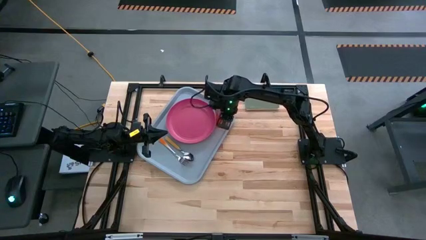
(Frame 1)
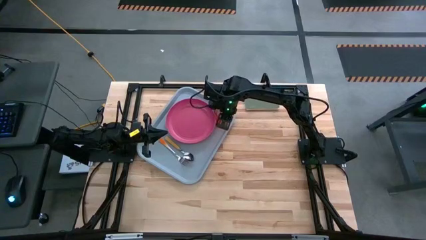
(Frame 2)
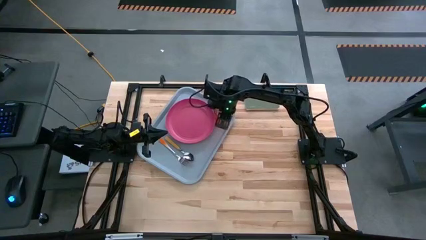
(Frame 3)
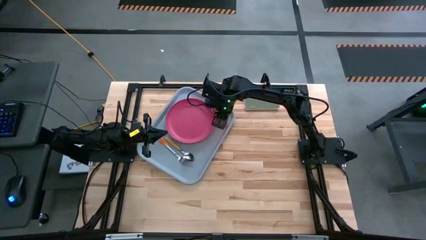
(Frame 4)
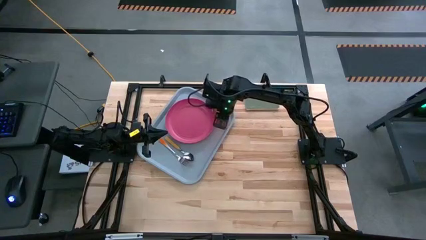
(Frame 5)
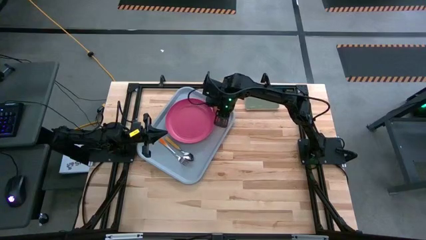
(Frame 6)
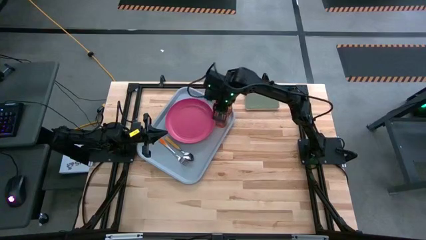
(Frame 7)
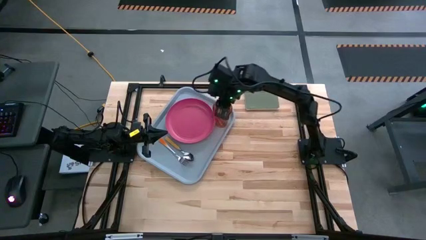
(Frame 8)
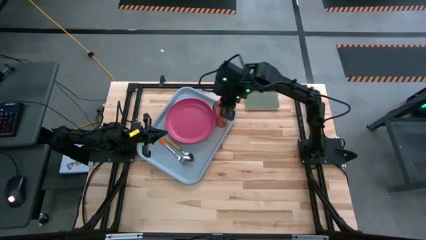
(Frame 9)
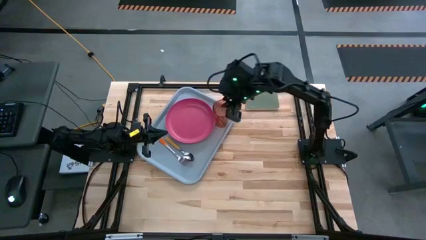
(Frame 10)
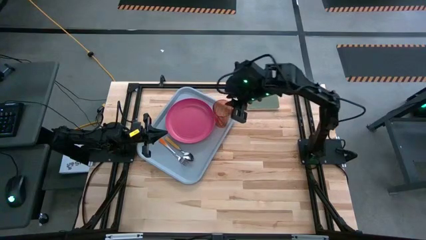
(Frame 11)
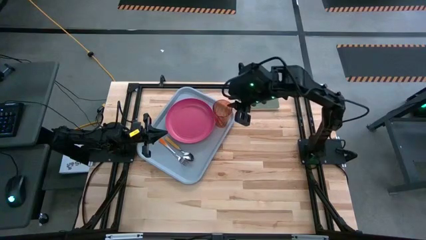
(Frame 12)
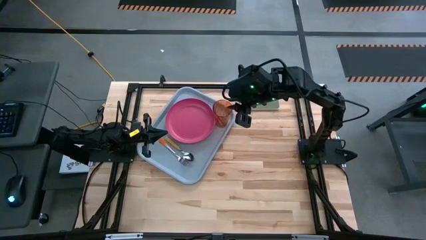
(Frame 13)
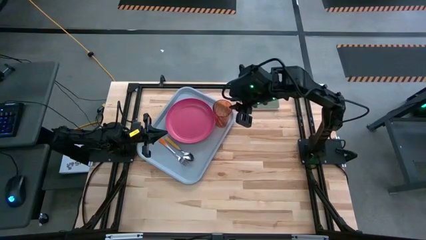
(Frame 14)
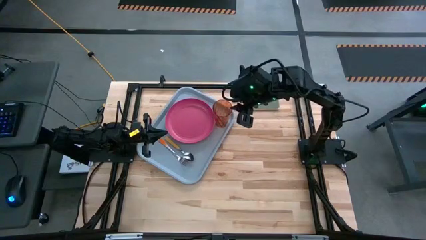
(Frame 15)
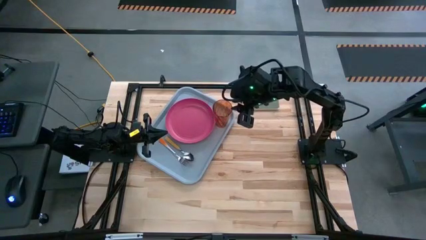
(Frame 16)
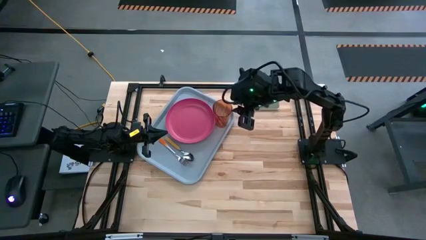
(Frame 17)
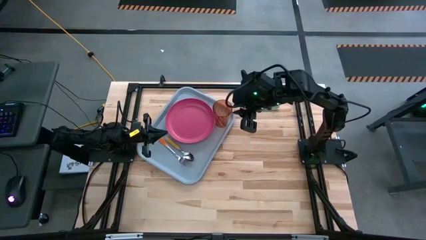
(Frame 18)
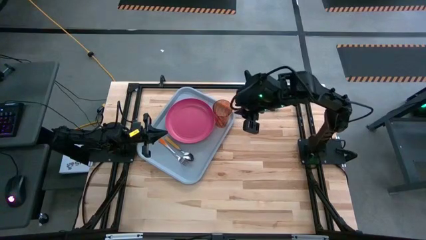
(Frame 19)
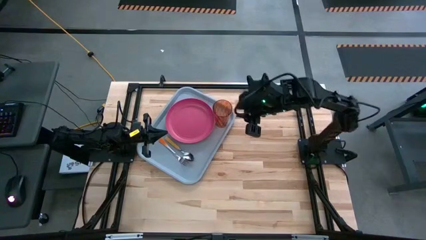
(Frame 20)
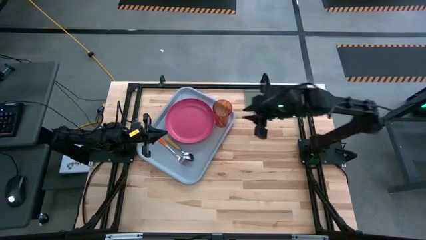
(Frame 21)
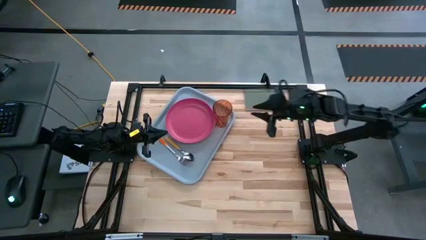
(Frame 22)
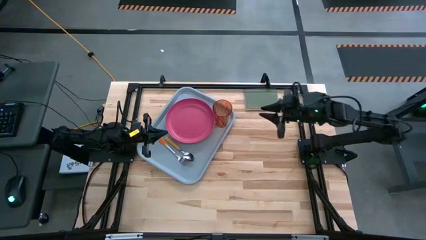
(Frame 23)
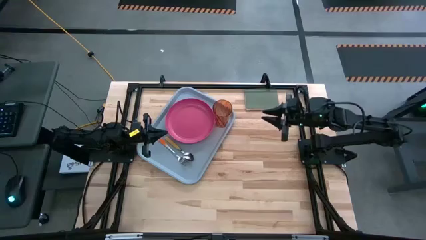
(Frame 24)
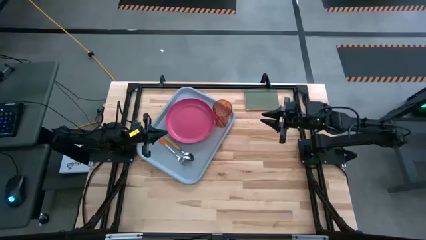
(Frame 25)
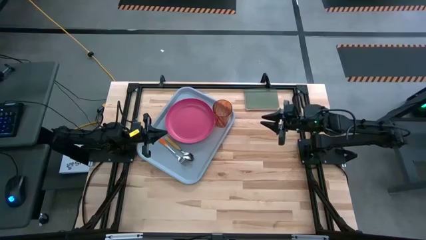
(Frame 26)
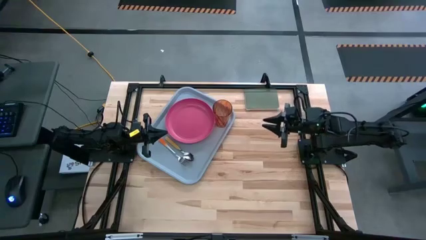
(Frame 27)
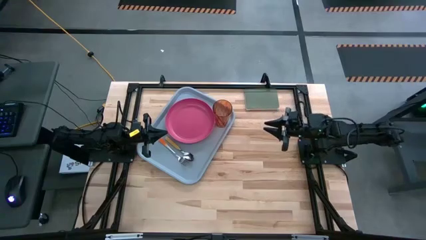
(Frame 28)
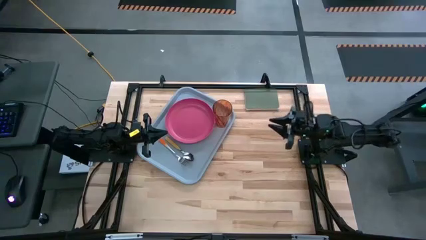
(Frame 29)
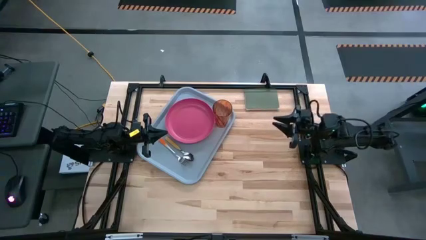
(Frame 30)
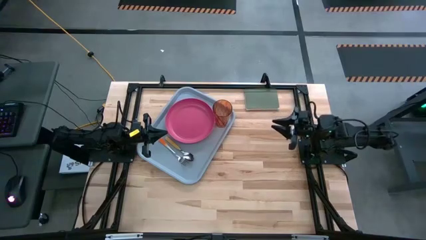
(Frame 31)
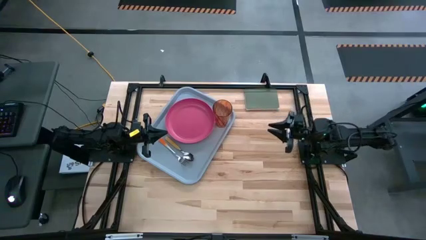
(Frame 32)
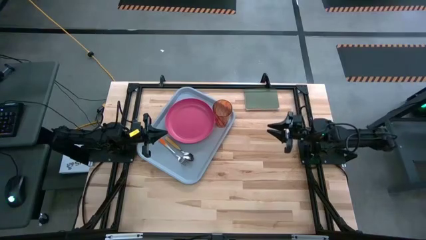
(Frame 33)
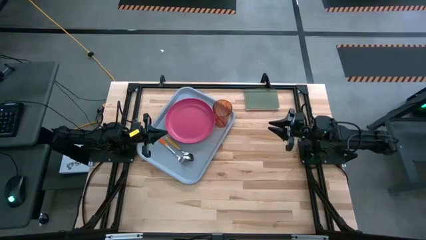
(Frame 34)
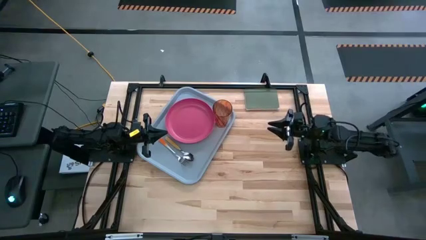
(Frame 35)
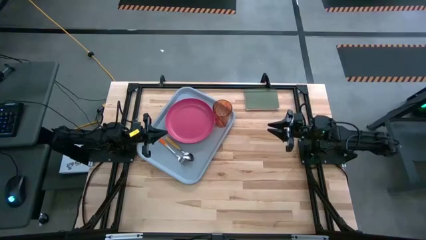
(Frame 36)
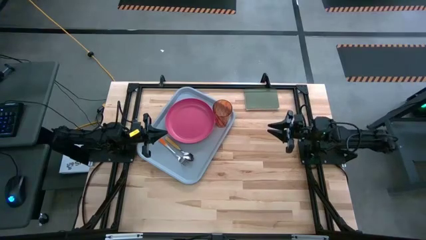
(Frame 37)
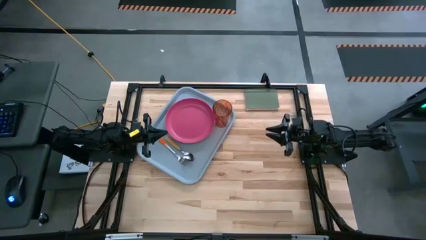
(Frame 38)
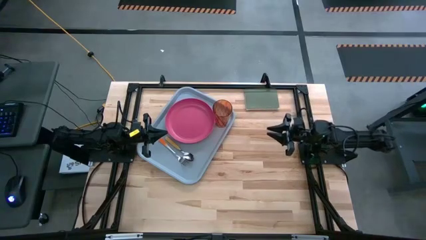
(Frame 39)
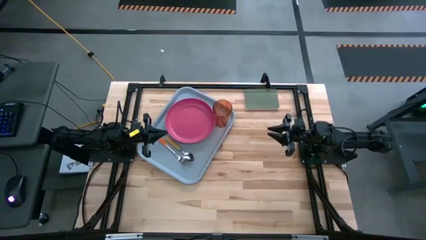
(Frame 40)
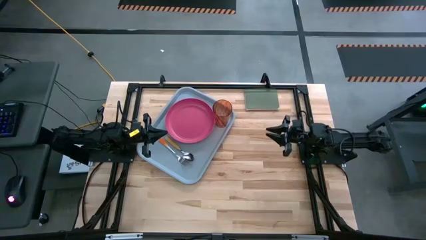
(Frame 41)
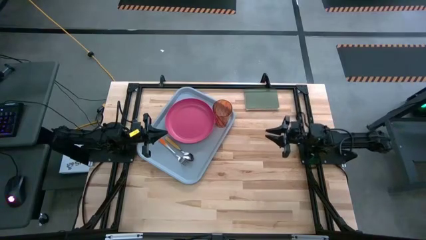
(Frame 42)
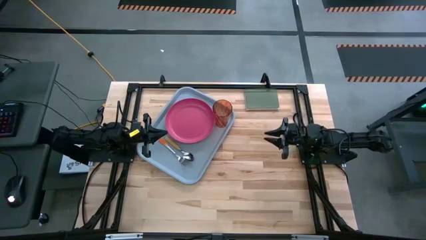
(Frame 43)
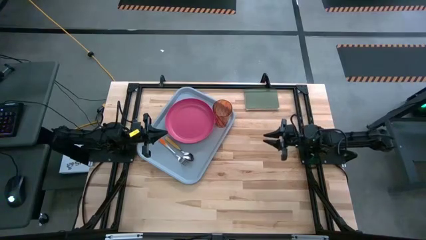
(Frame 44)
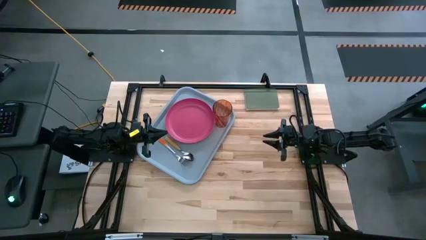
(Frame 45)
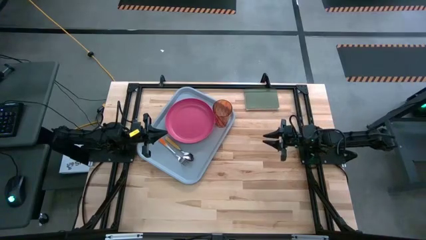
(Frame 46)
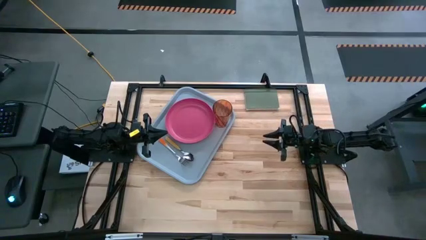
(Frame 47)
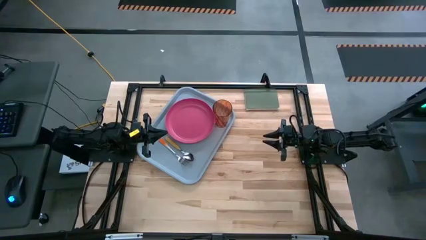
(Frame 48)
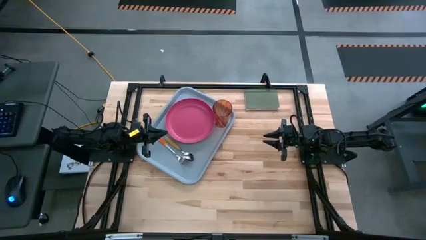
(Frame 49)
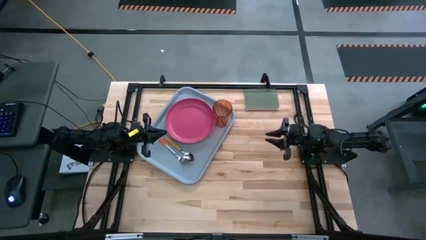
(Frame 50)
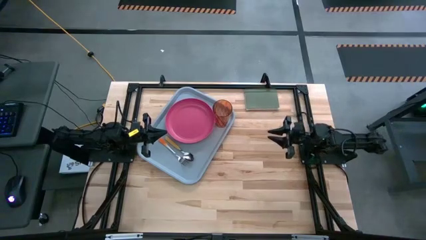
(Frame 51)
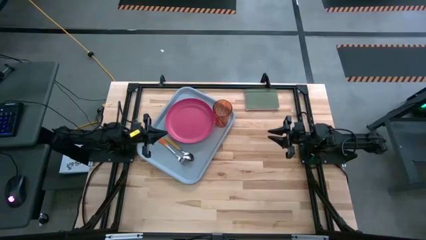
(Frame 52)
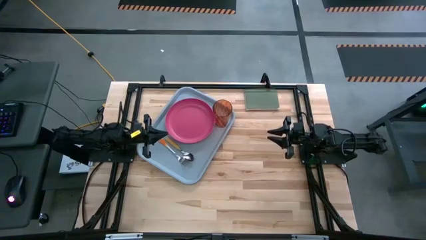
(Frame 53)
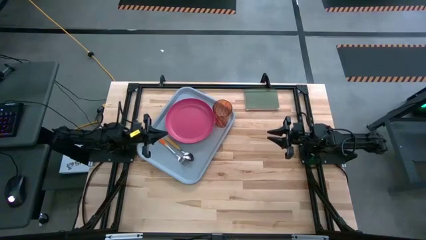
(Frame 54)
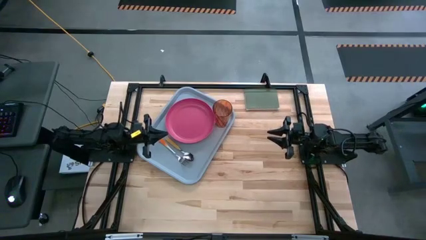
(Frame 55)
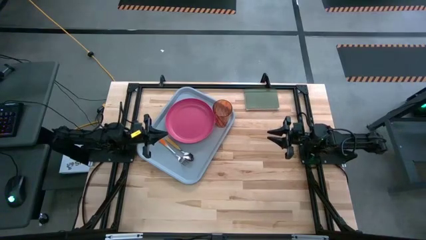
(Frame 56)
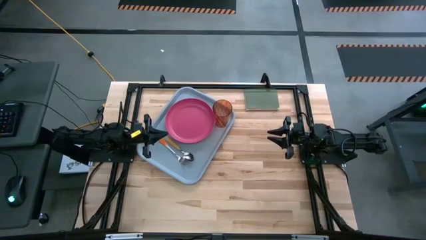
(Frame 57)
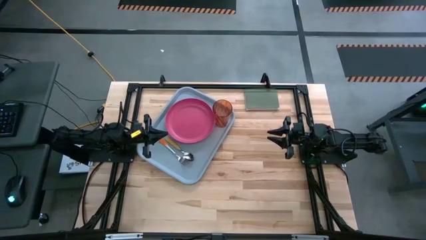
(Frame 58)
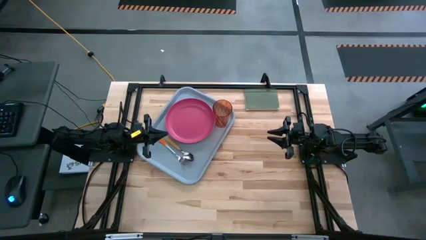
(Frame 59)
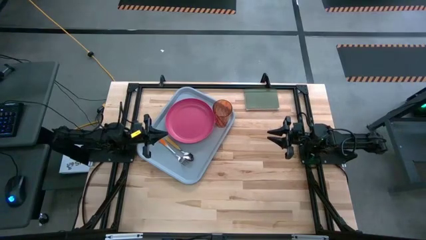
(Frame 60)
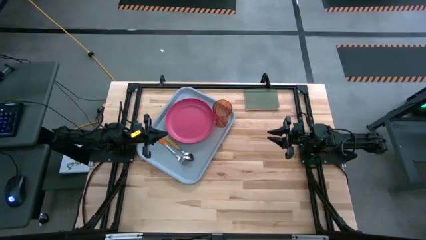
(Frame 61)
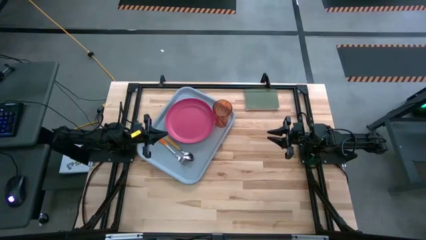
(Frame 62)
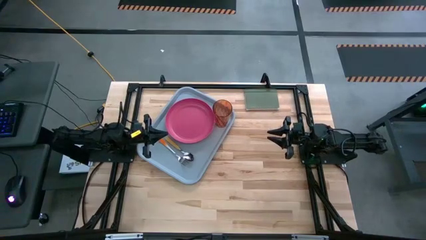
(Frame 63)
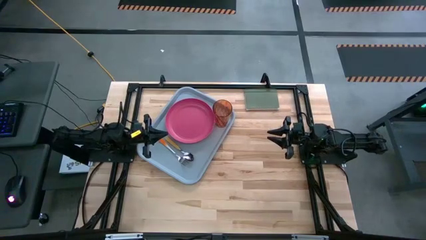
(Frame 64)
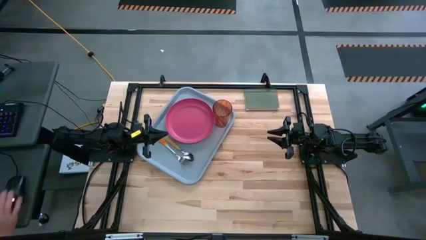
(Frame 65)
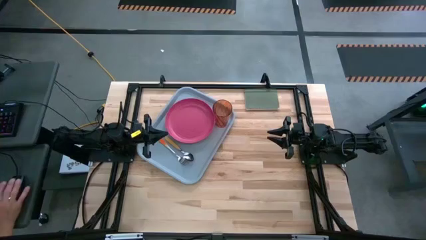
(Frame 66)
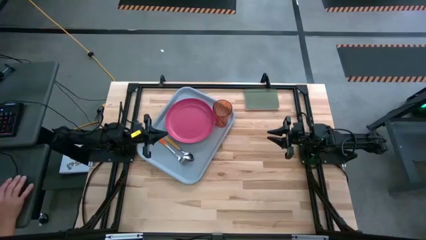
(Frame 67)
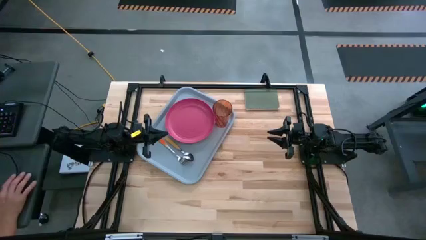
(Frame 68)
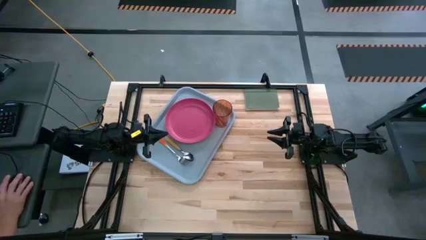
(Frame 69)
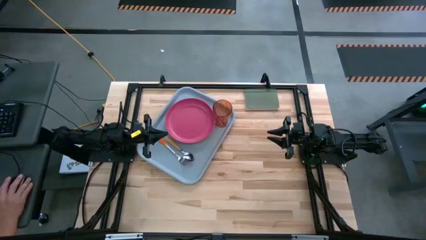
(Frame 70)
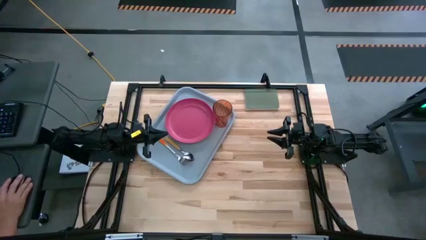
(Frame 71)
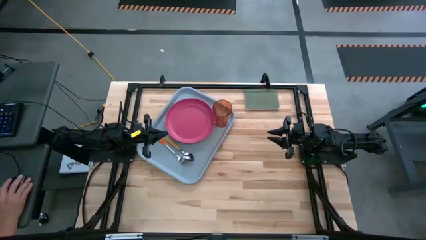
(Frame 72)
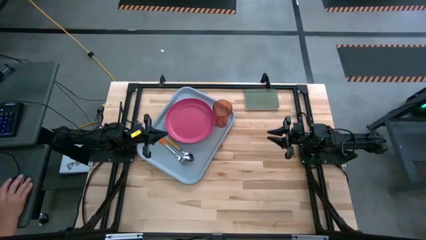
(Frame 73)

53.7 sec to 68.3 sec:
Task: Pick and place plate/cup/fork/spoon on tray
Return to Home Position
